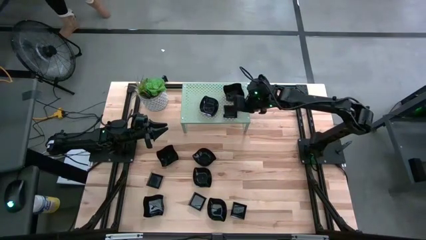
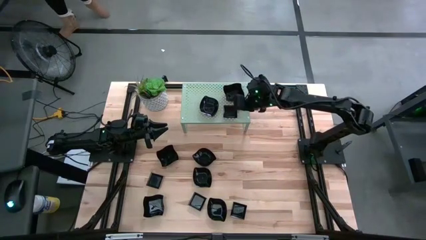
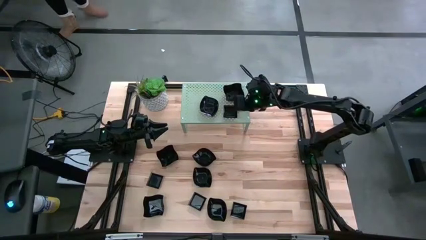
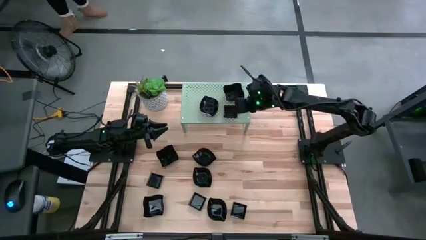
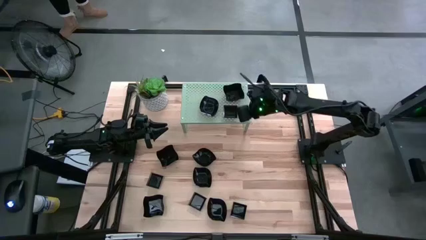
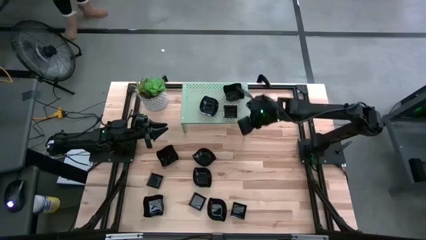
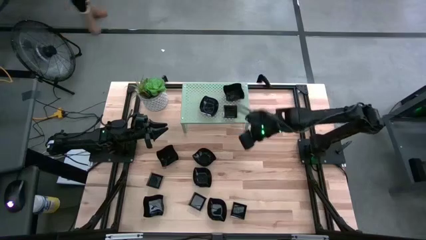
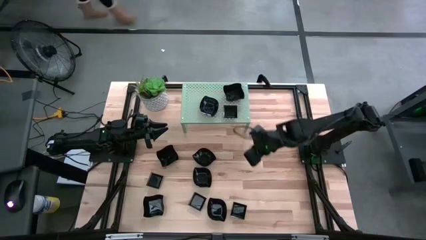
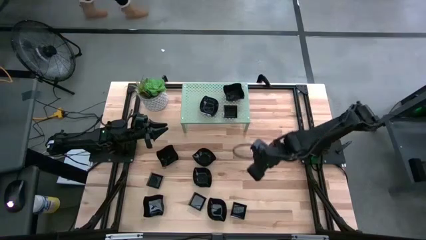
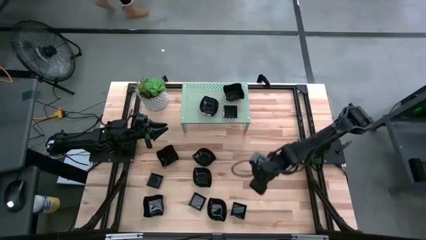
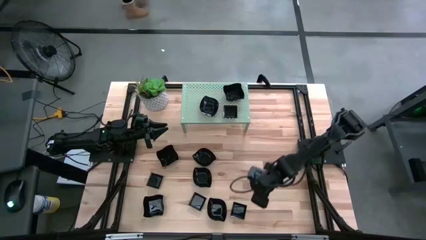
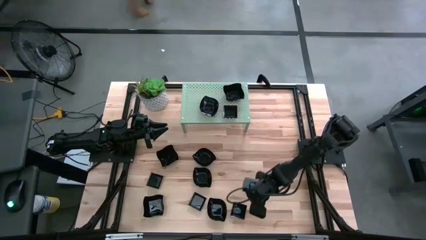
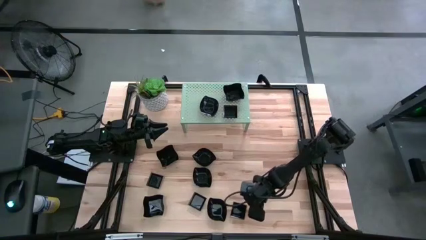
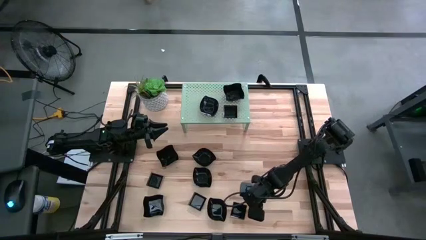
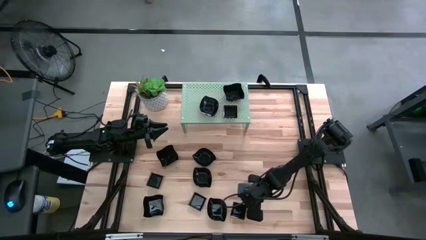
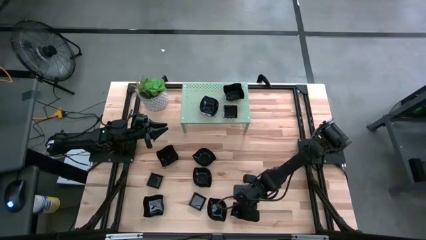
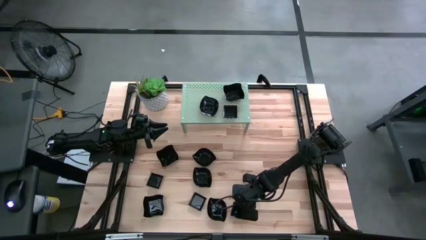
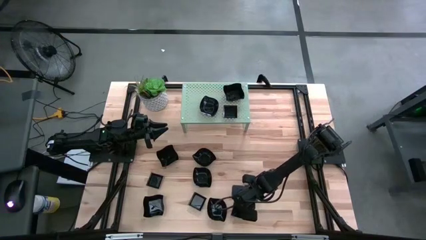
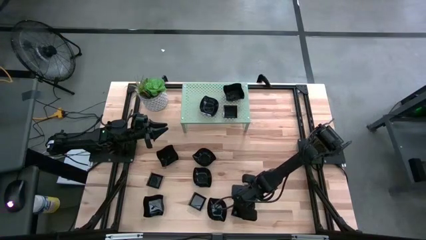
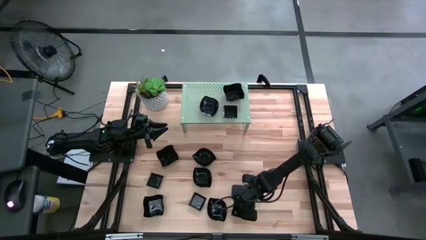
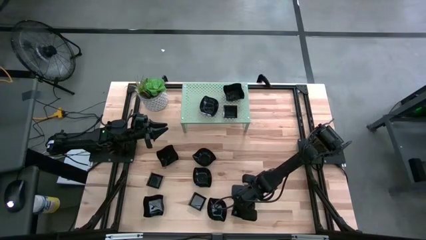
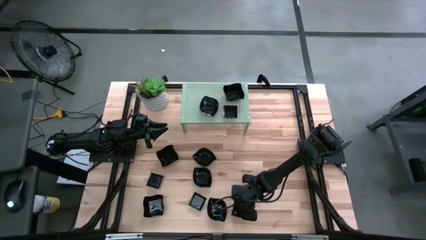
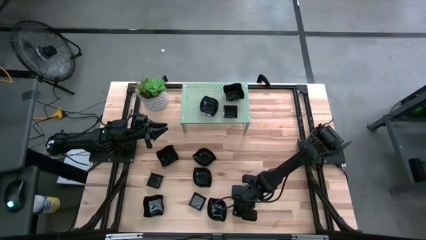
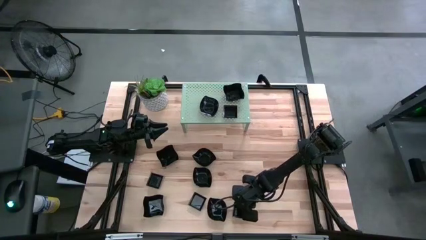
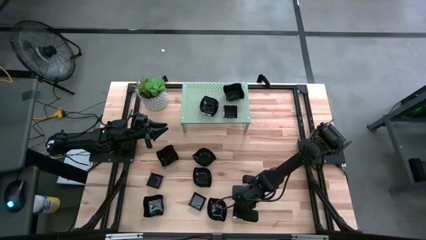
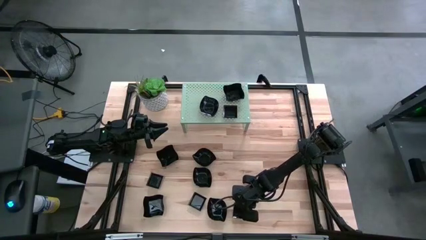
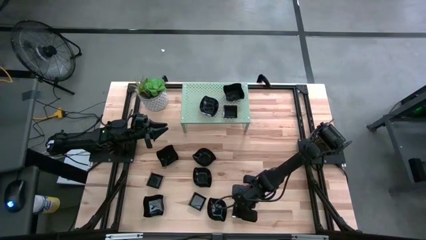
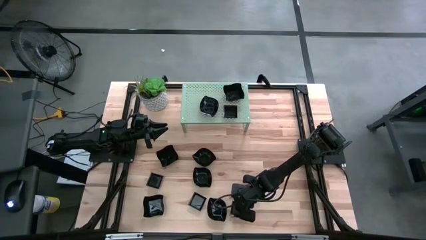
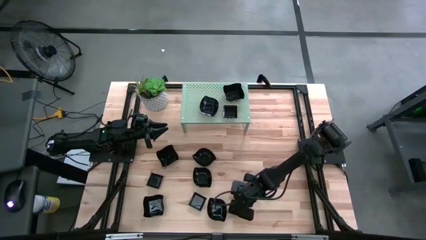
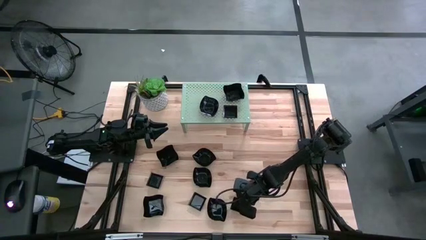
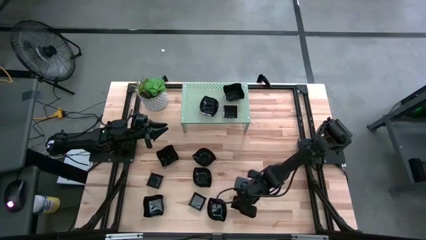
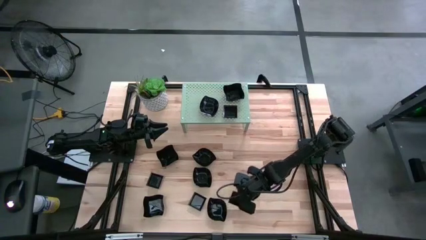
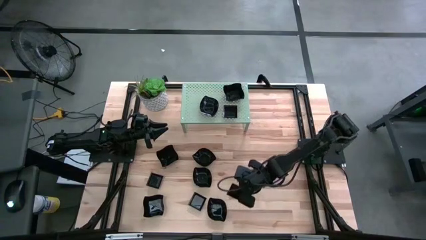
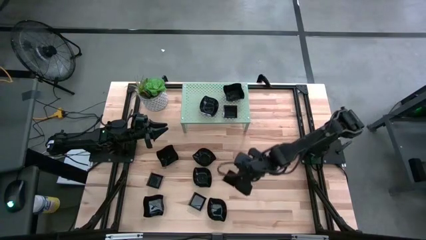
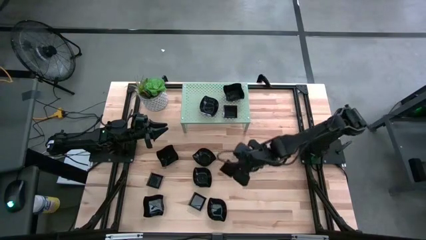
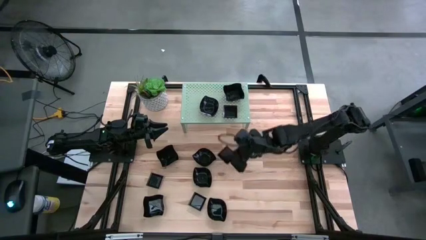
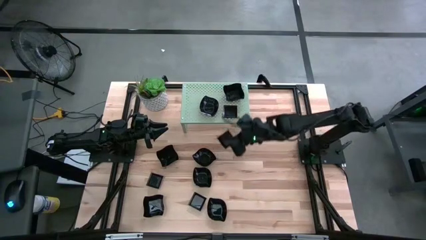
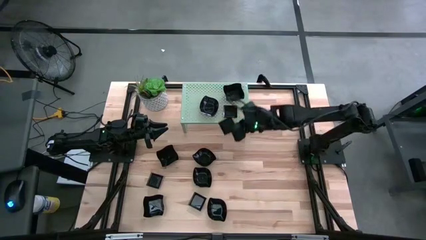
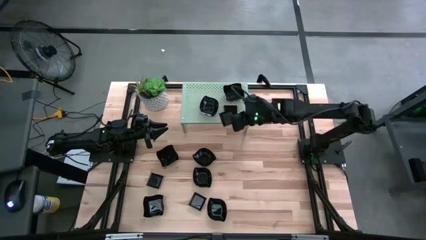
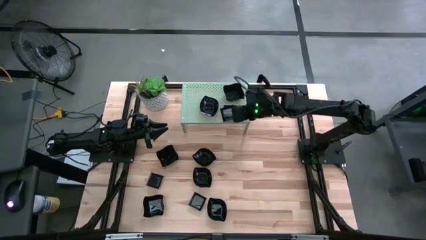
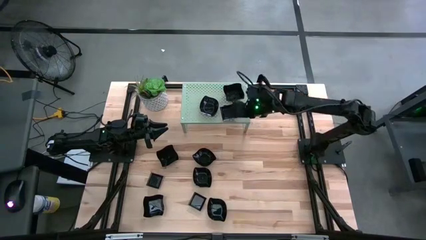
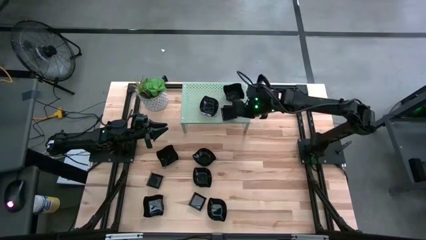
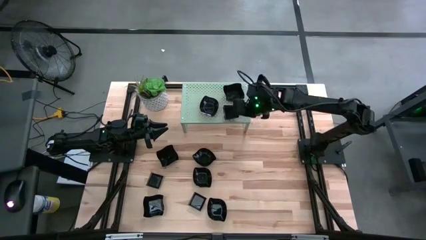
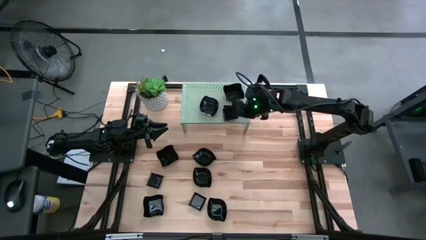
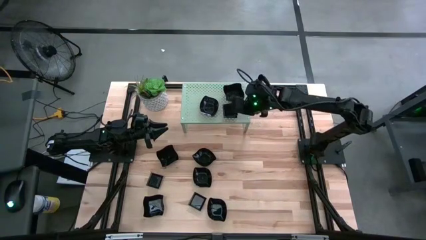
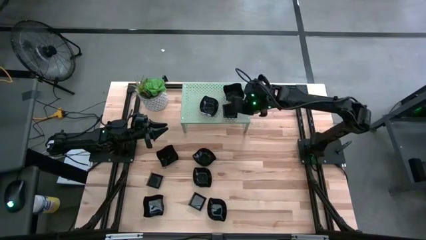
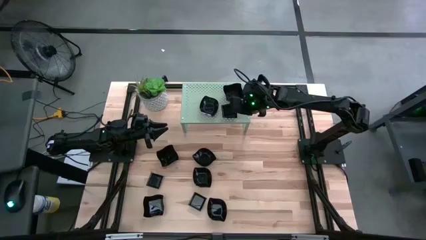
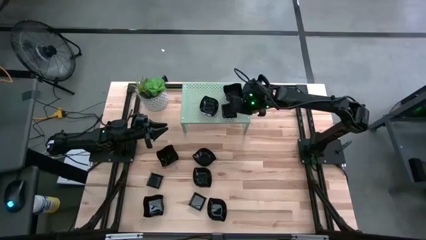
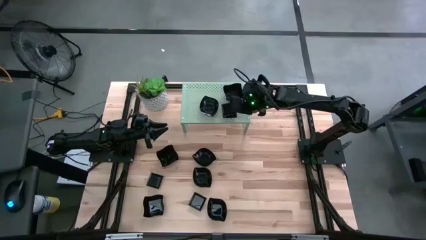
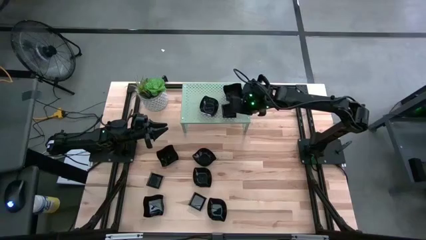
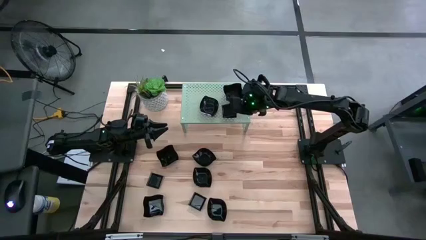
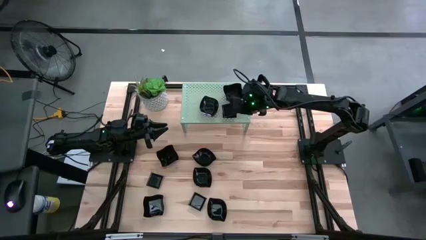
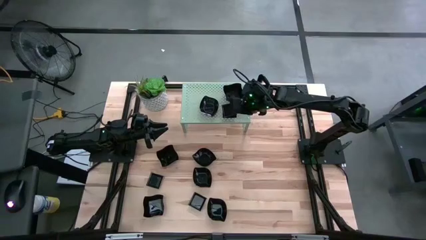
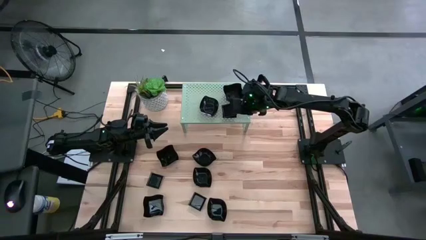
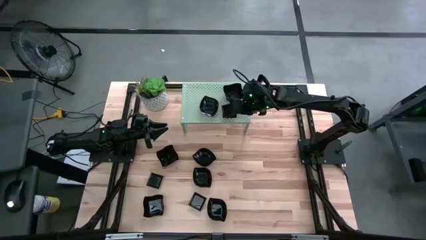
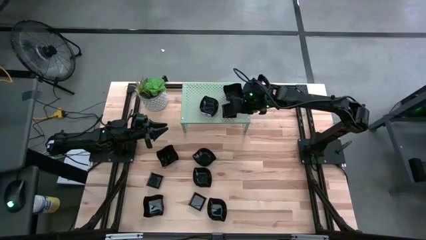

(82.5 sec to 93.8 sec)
Task: Pick & Place Mini shaped plates
Stack the square plate on top of the square plate on the shelf

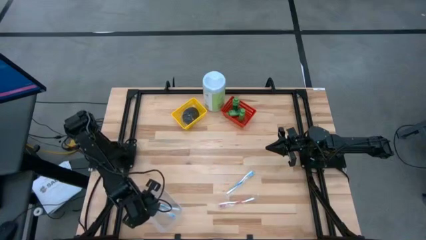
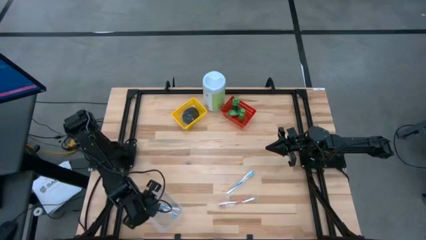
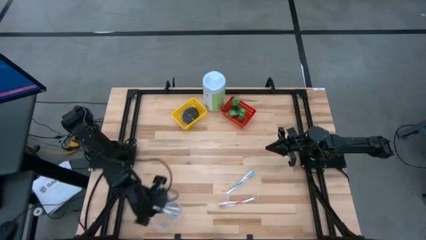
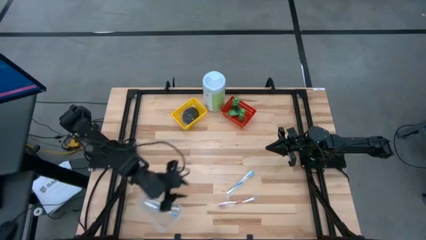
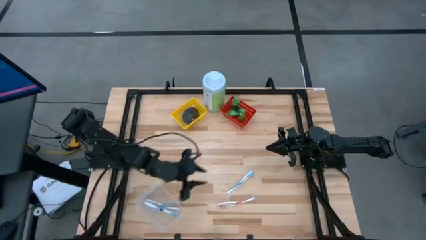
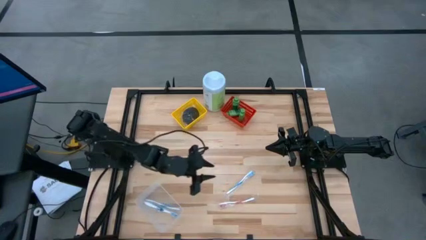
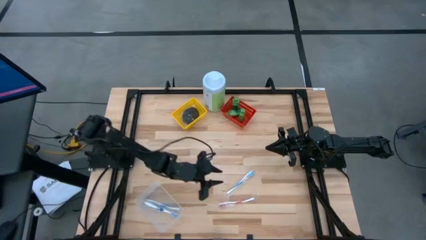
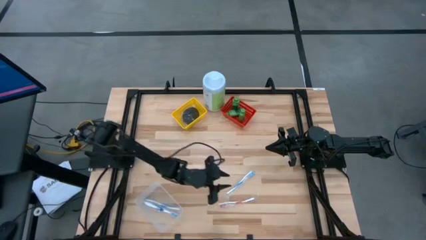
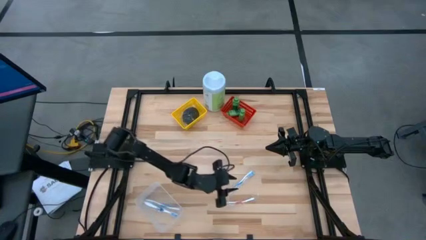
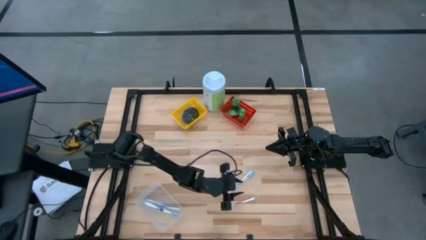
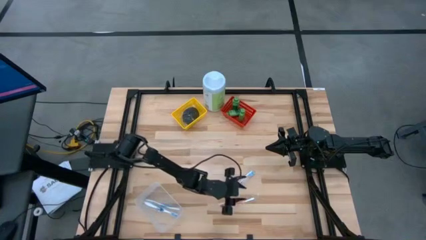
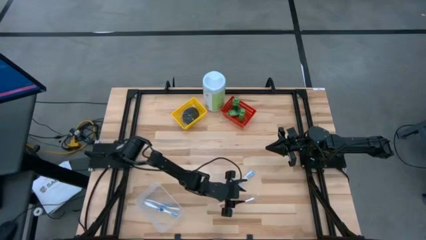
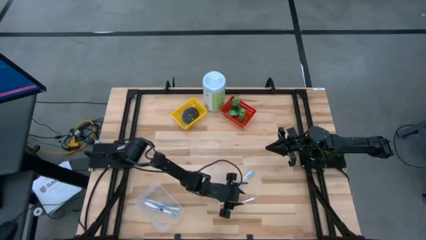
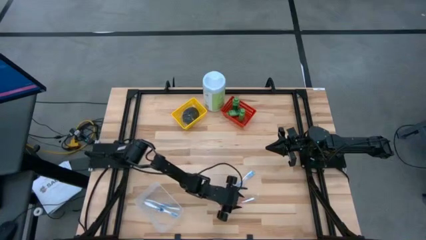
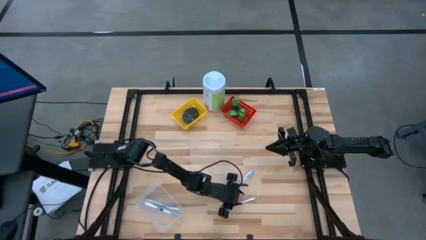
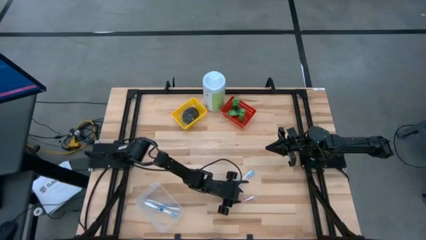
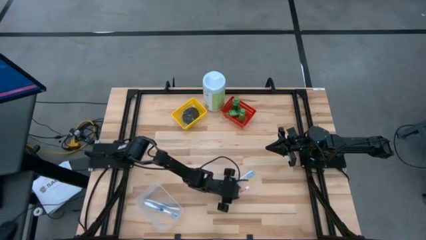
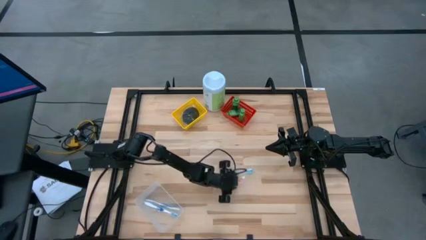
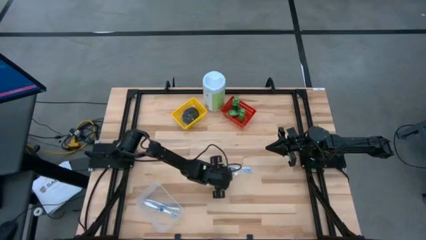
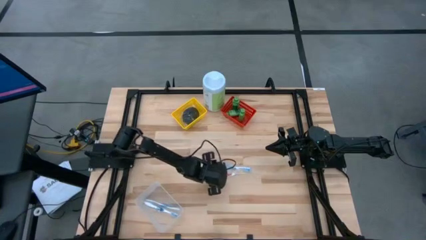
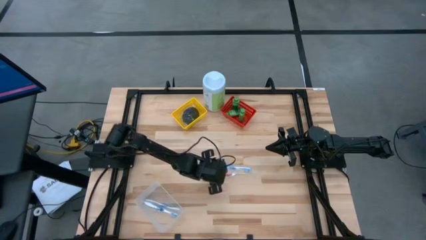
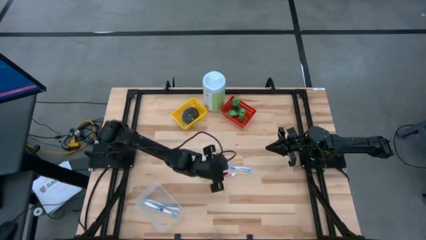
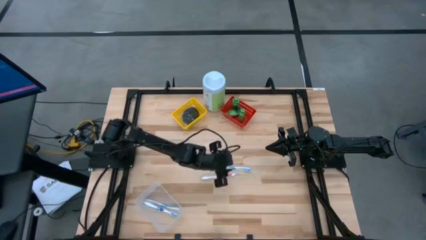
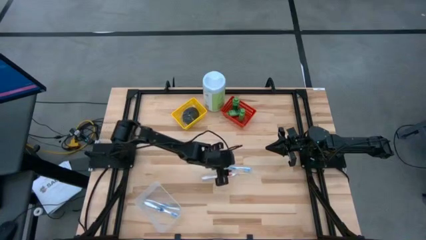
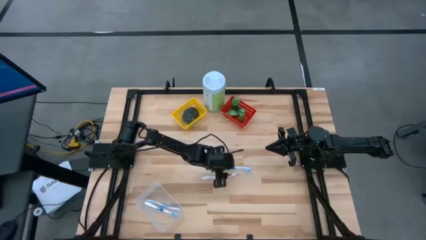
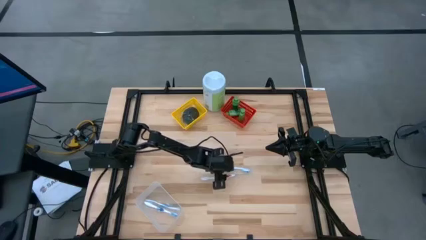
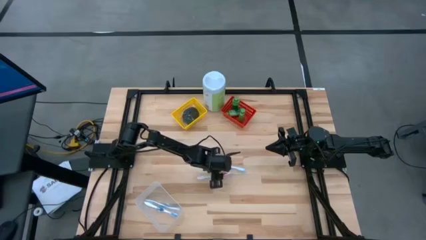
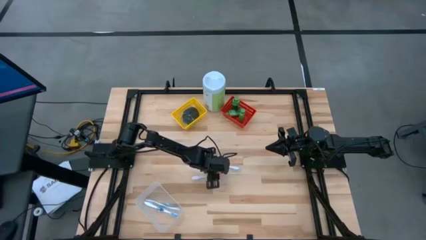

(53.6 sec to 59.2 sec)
Task: Pick & Place Travel size toiletries
Move the toothbrushes to the center of the table

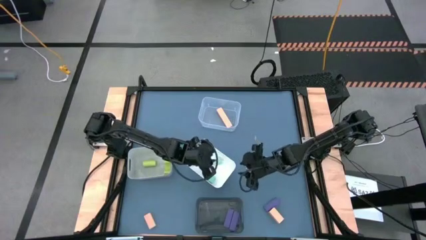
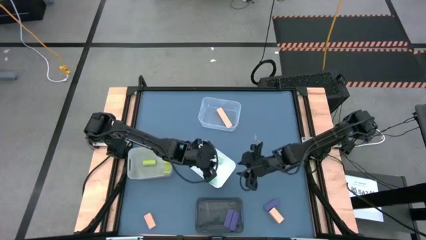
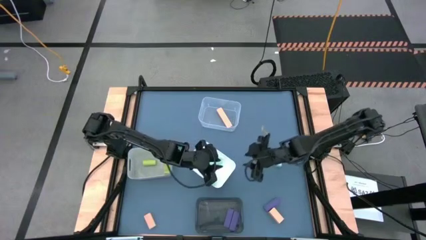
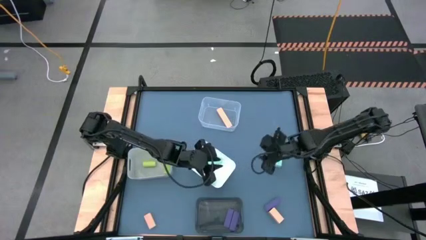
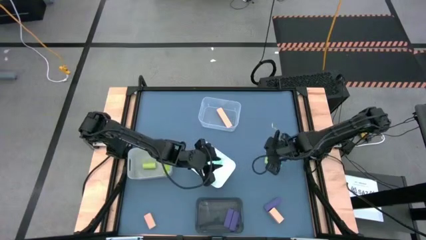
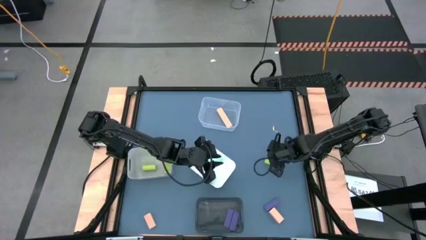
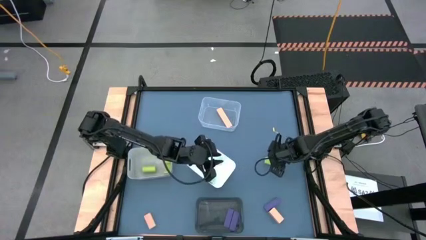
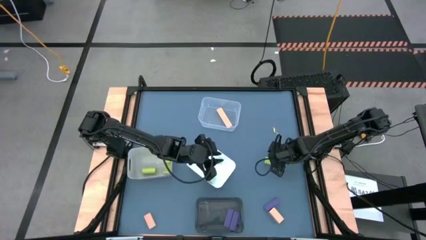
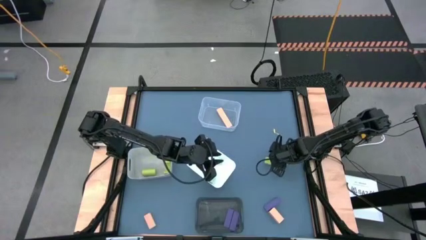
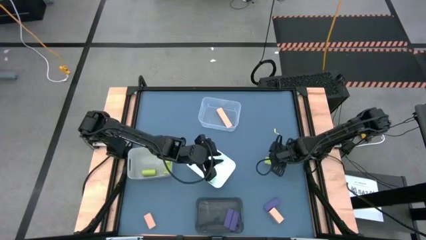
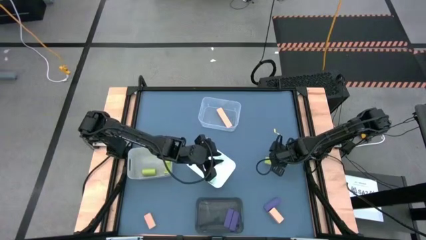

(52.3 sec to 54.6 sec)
Task: Sort & place blocks by color
Put the blue block into the white bin
